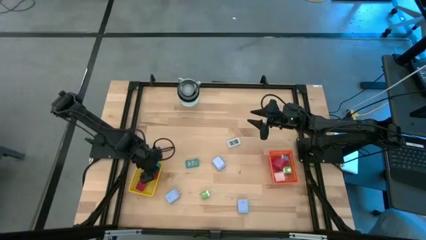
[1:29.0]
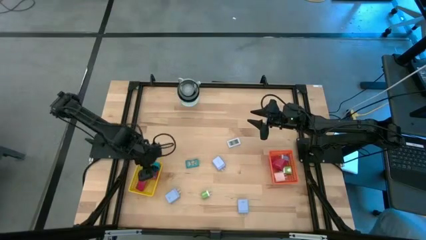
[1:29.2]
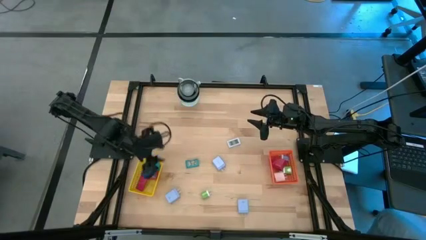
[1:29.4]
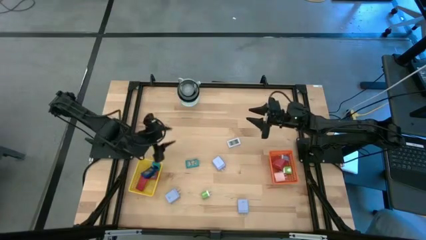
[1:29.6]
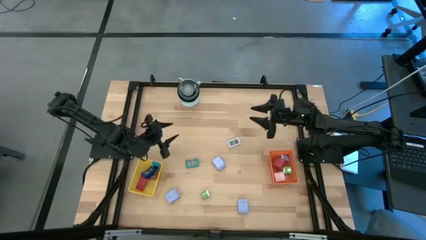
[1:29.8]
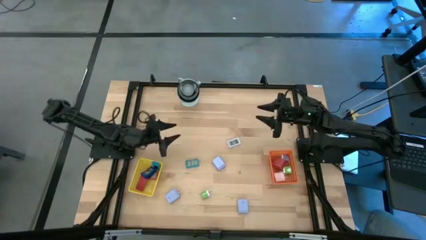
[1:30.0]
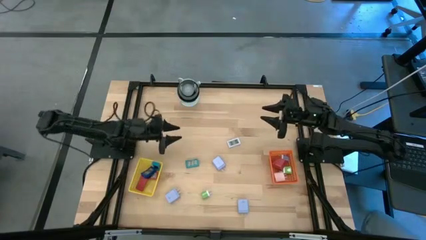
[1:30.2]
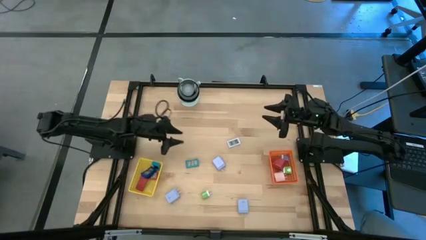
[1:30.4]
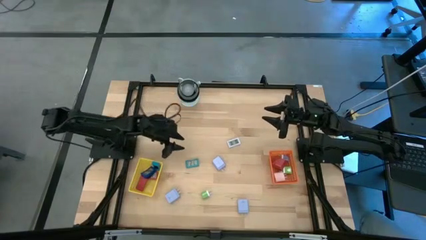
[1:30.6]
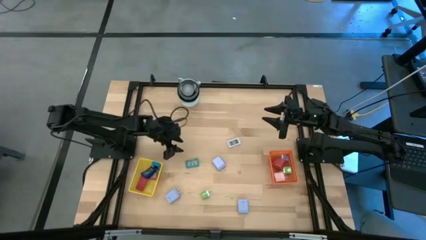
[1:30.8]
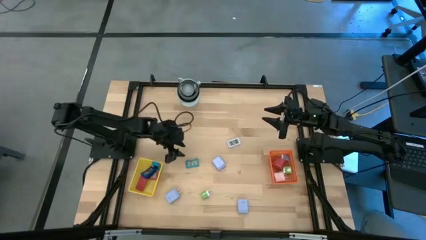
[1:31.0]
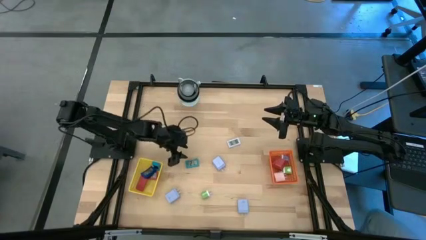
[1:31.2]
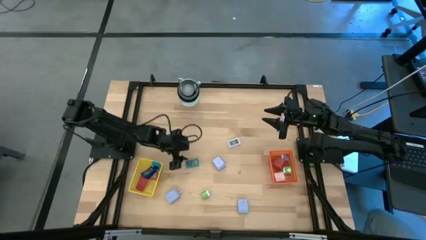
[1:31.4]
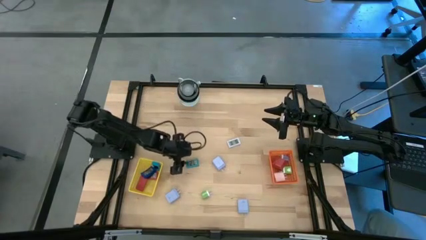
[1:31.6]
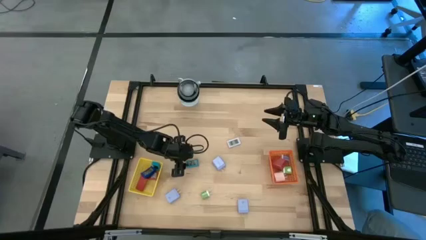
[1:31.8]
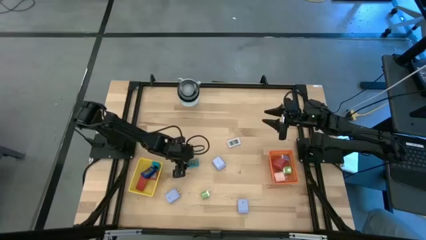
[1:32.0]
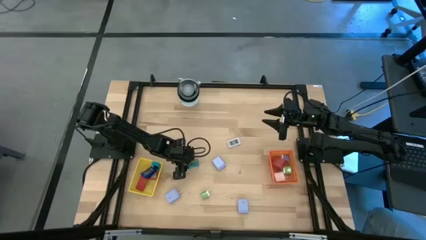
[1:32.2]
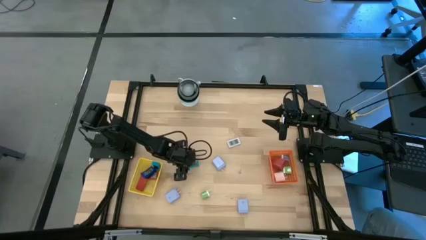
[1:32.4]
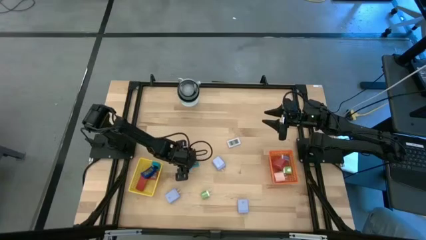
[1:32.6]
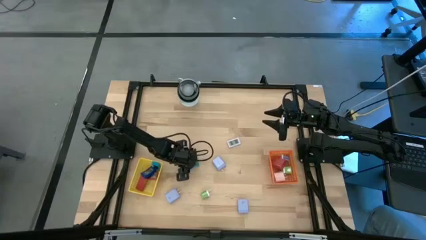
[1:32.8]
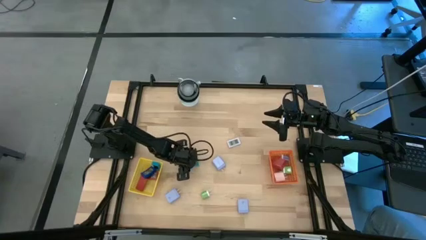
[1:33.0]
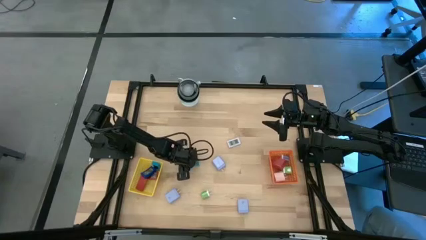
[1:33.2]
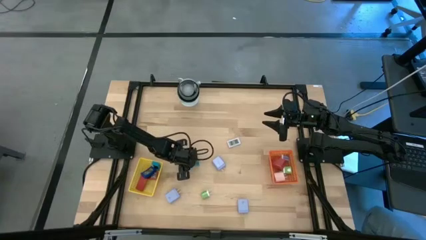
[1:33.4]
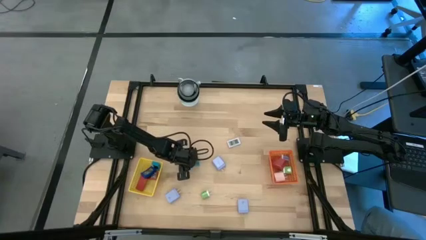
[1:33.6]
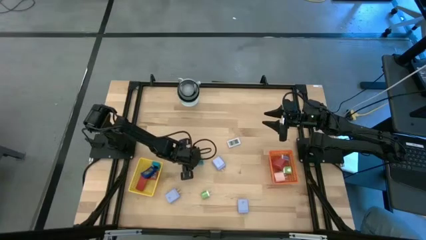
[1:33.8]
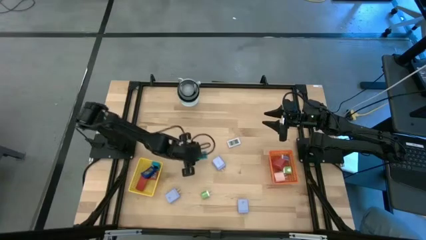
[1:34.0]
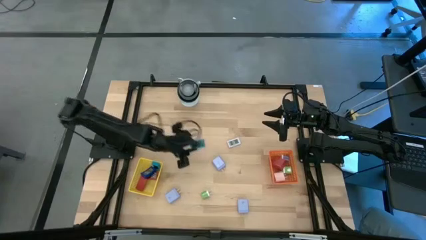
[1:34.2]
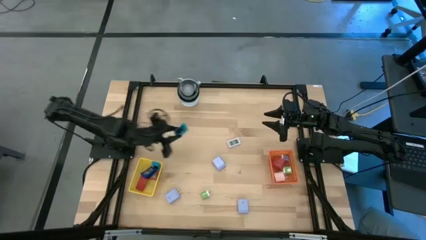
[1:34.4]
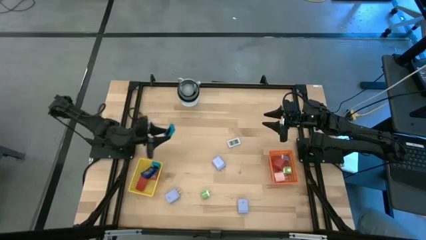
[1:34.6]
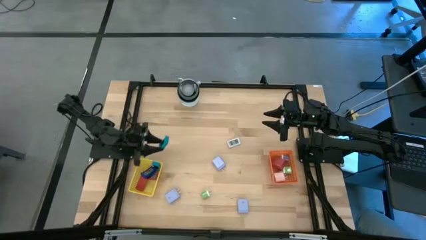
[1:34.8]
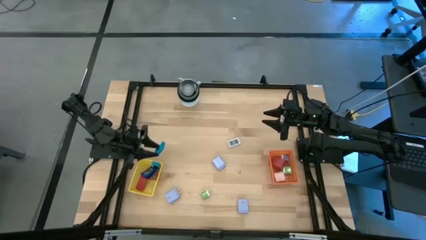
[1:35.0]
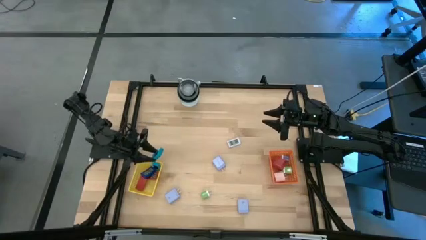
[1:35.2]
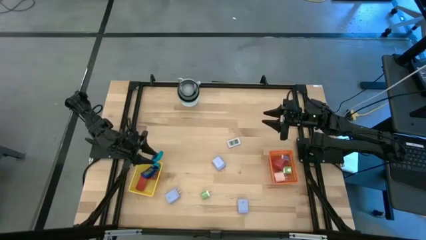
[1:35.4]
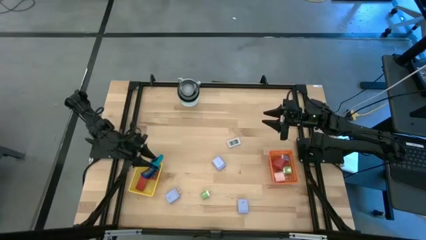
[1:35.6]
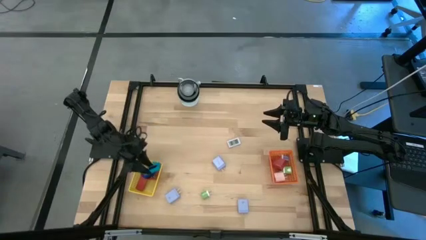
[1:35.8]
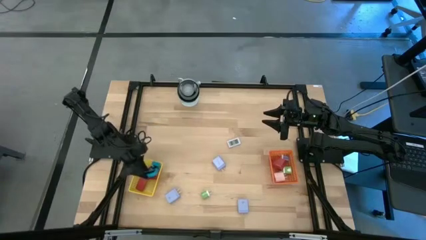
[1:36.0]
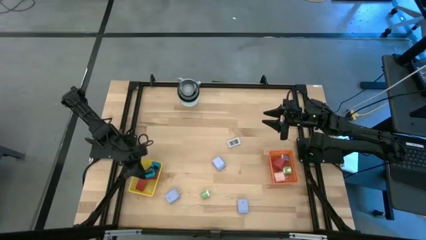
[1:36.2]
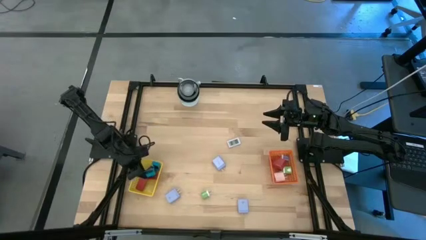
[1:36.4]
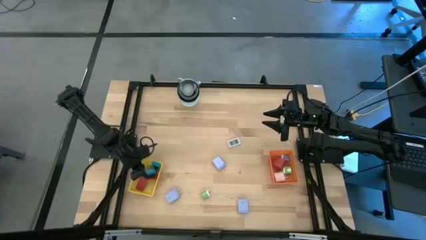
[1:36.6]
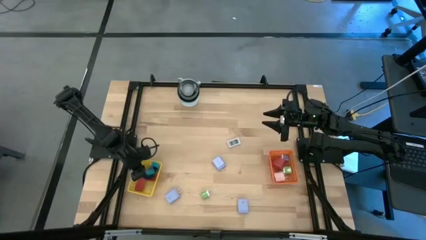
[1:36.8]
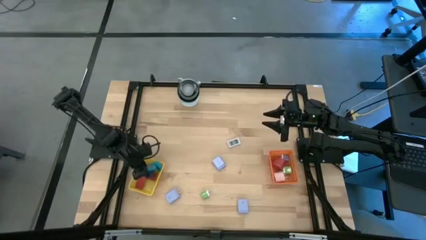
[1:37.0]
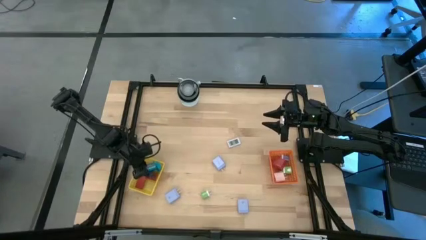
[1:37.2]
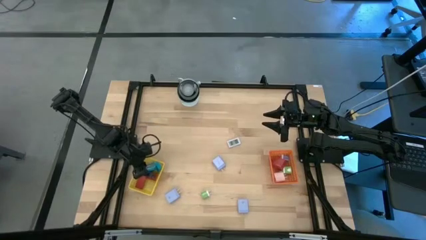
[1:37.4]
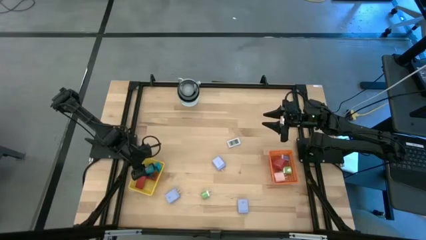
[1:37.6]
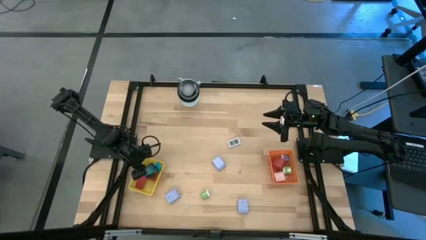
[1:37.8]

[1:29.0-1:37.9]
Task: Pick & Place Office items
Put the light blue digital timer into the yellow basket

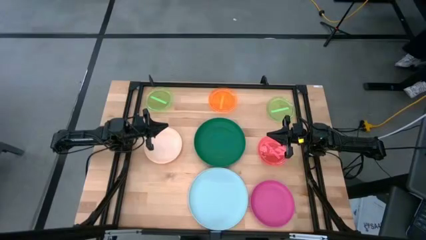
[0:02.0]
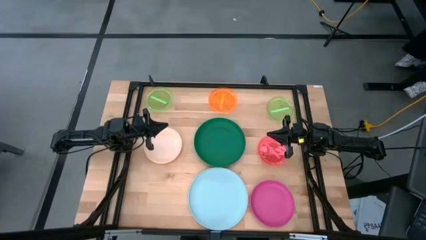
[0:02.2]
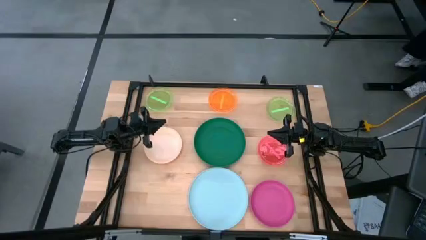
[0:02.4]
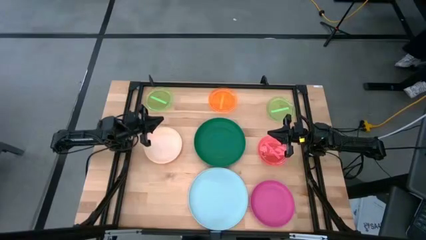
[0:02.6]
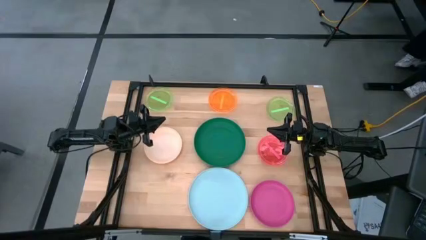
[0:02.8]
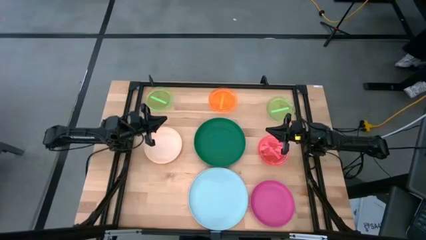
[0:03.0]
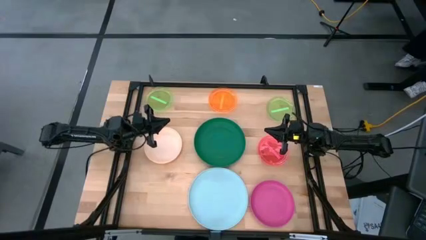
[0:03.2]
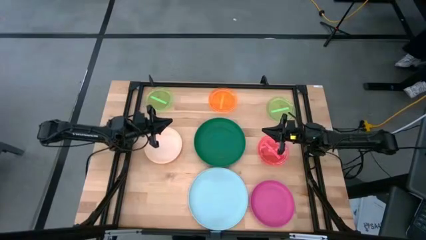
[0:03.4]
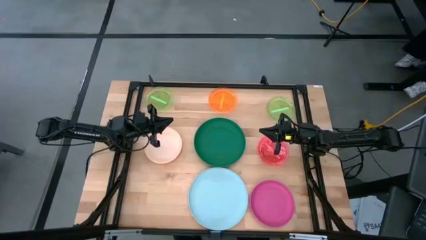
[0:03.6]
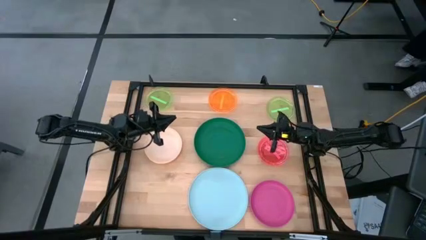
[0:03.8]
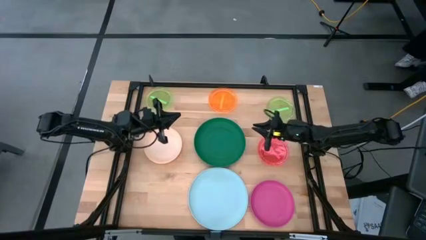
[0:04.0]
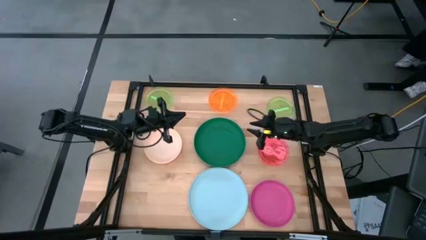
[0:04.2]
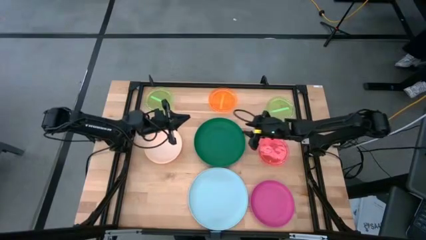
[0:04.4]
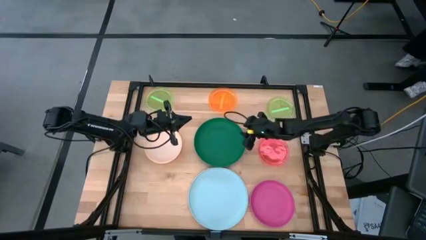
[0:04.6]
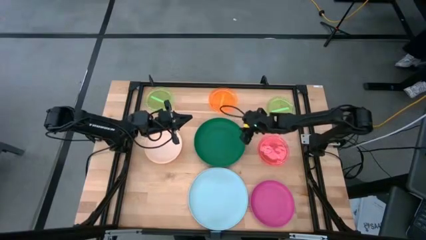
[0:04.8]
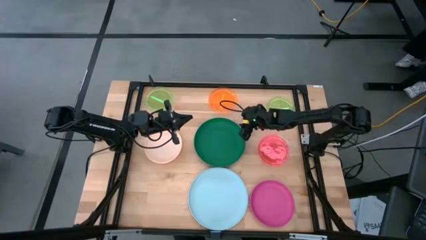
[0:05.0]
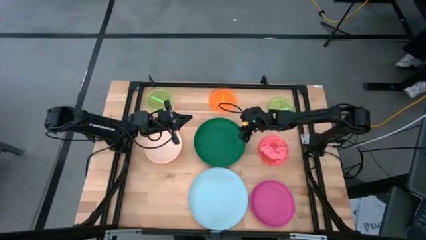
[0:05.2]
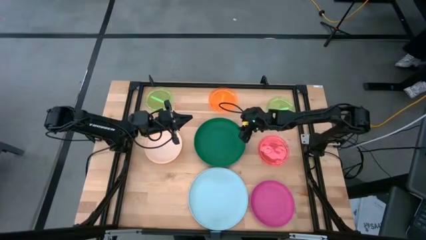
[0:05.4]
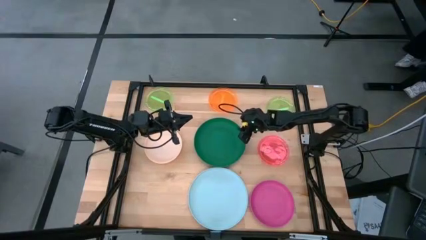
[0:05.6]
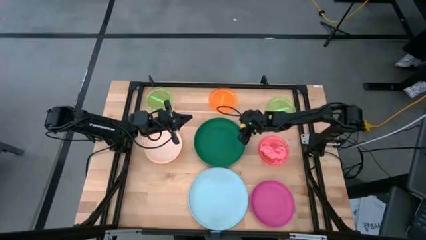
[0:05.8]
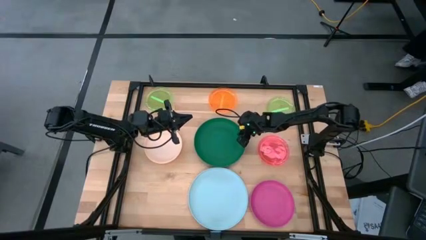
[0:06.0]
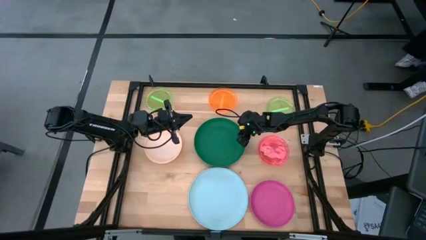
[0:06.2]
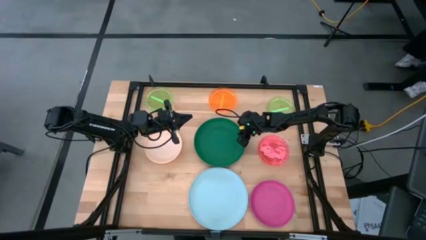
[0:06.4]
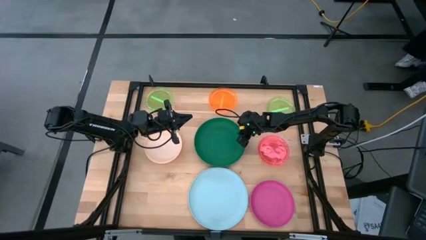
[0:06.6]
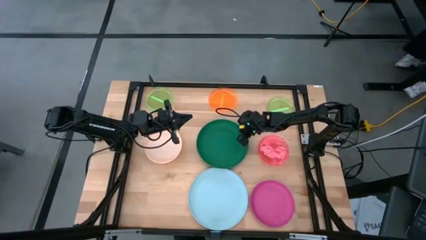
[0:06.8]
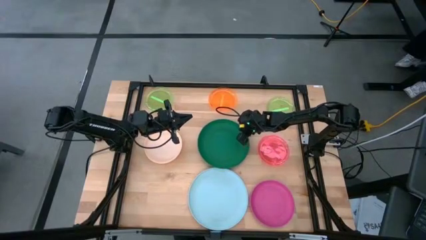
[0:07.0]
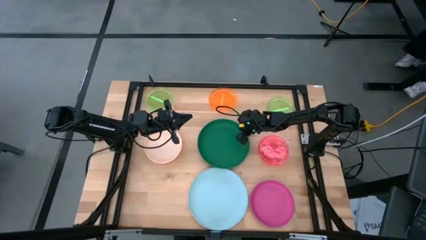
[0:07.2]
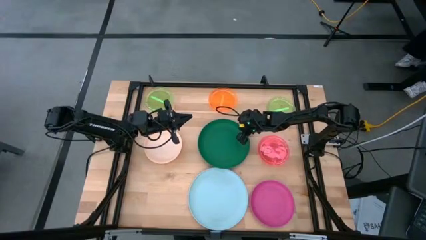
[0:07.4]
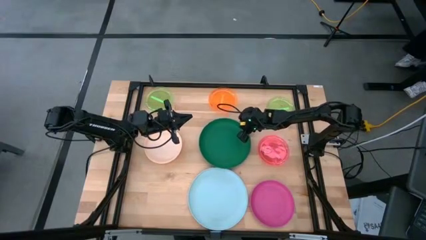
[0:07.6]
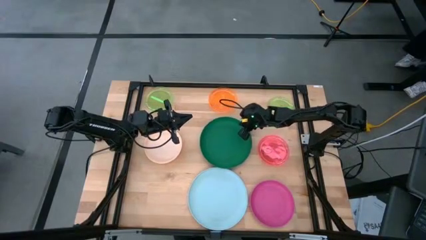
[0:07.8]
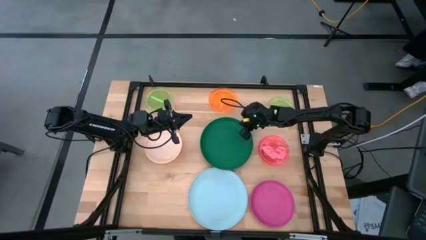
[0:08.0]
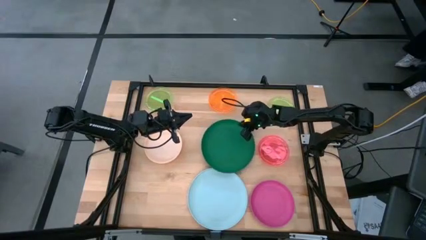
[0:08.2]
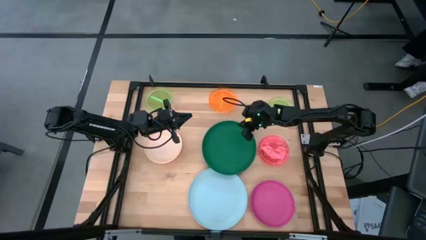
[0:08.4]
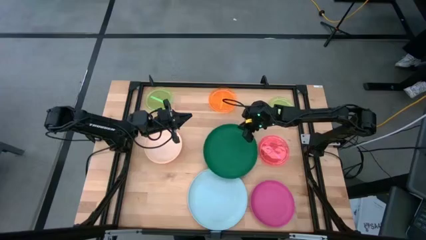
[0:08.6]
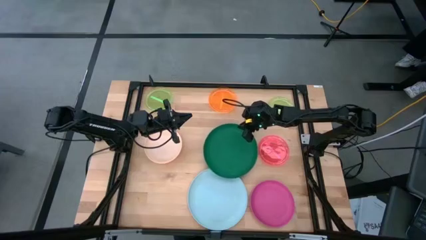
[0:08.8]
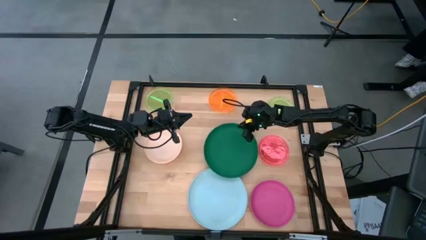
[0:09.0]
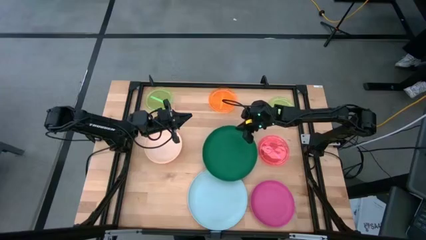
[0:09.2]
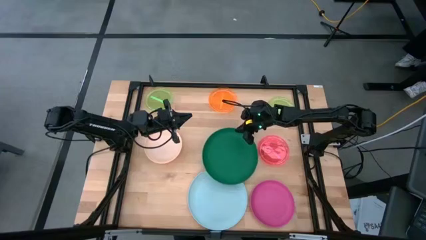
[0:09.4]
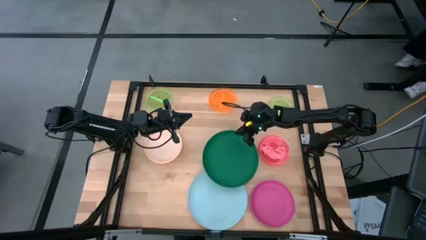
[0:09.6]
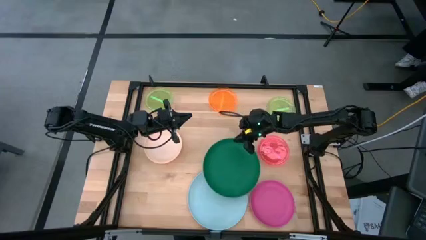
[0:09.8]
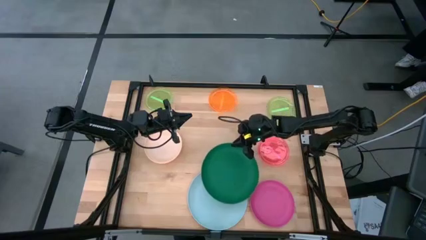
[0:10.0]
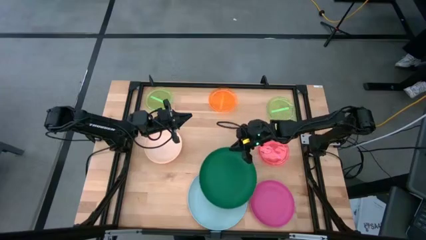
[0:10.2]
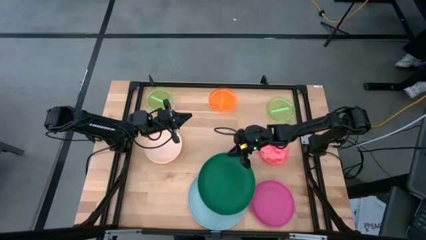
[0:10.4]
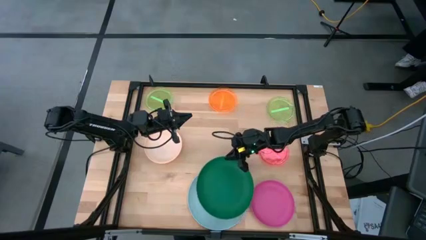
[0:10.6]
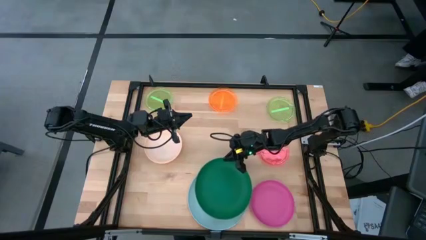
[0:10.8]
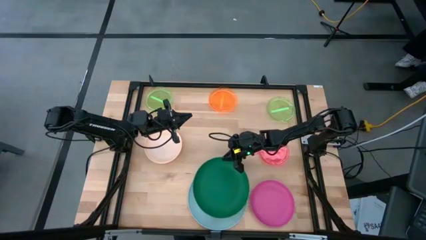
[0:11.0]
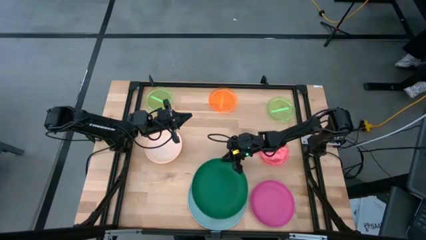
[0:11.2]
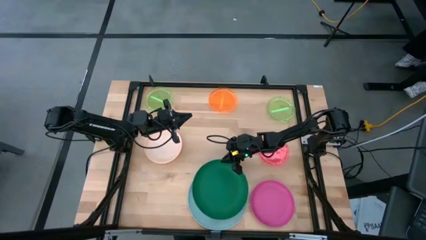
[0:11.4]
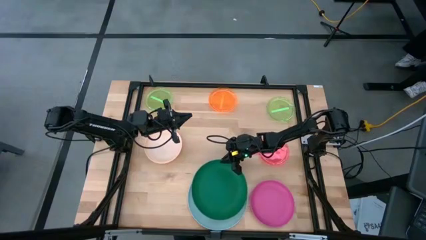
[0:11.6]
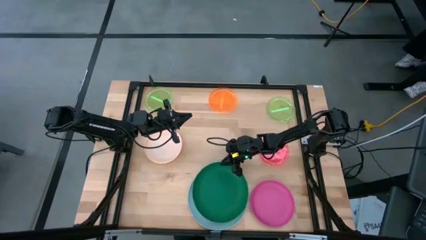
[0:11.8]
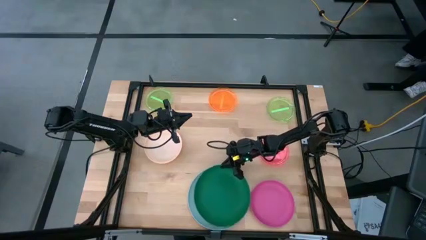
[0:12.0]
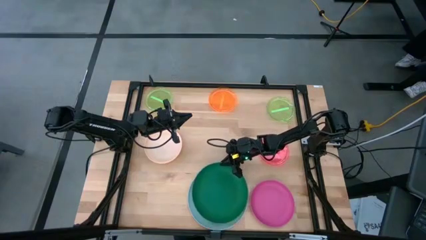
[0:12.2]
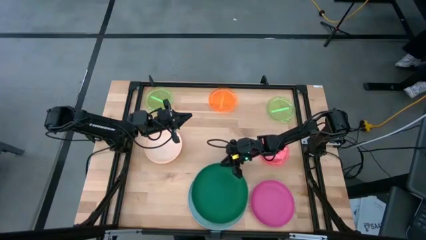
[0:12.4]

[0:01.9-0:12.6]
Task: Stack plastic plates
Stack the green plate on top of the light blue plate
